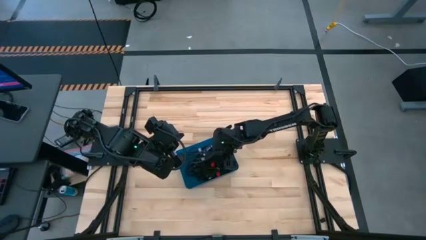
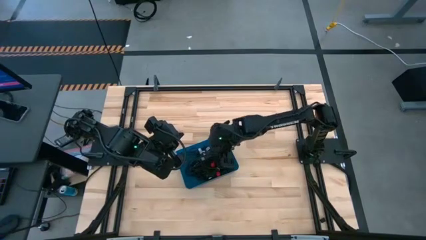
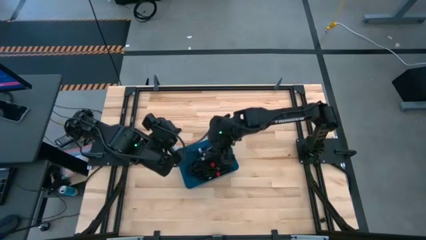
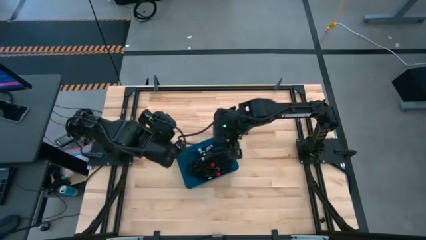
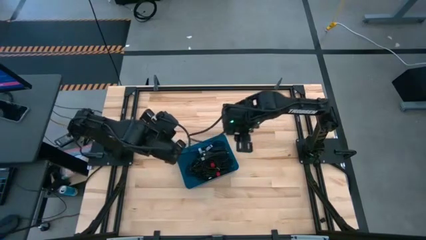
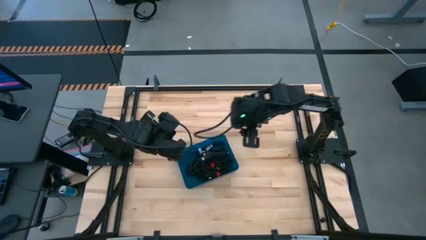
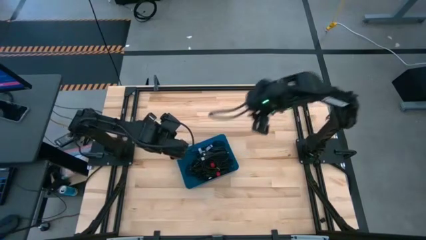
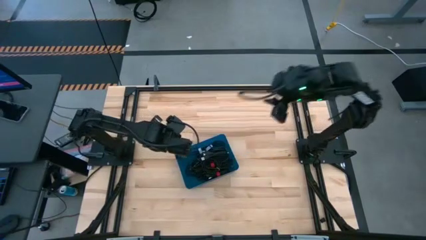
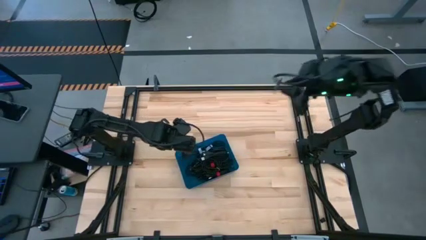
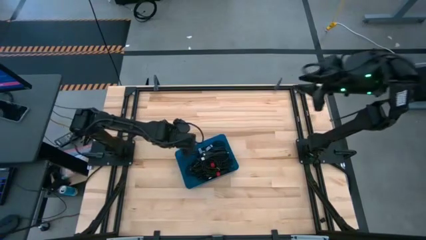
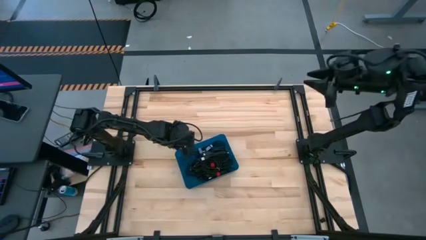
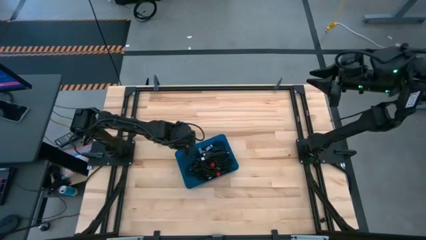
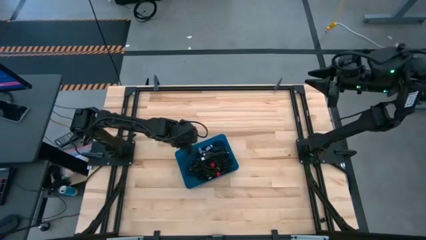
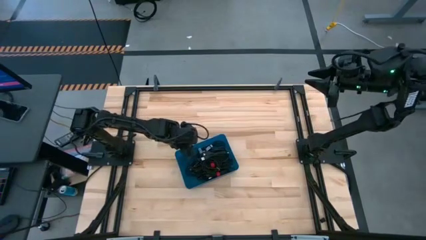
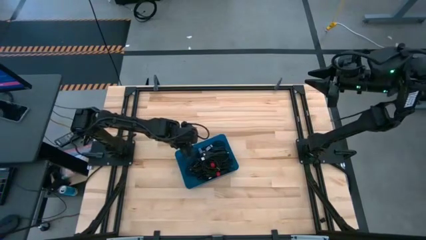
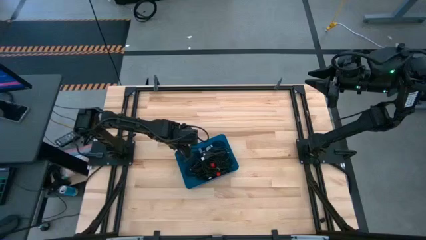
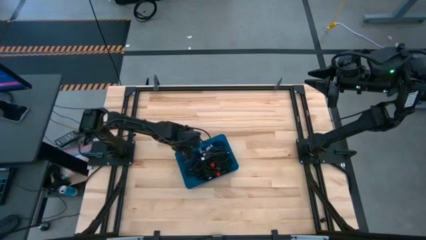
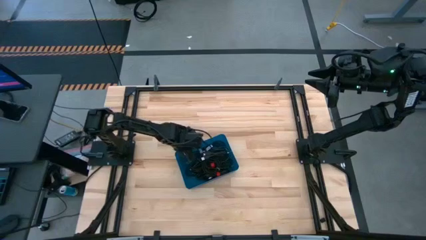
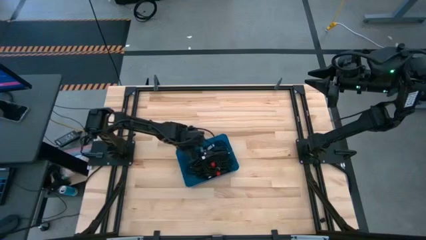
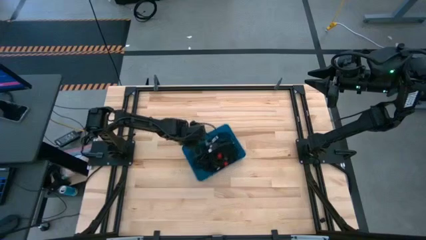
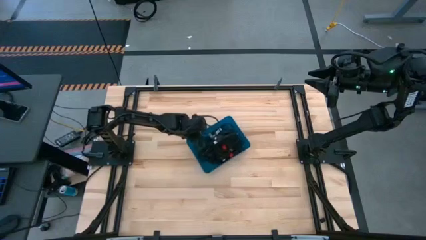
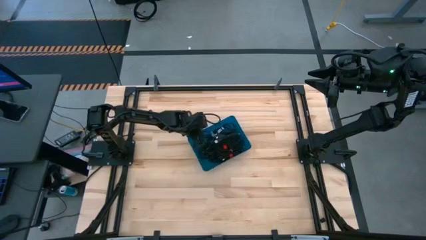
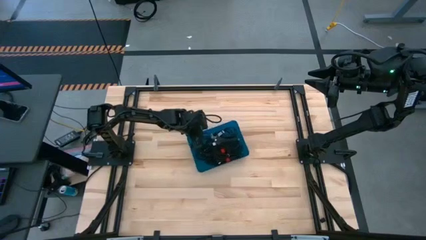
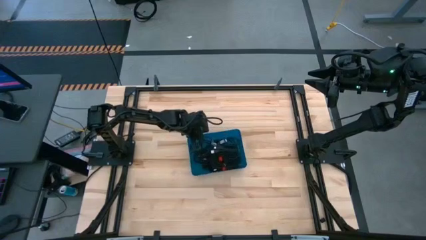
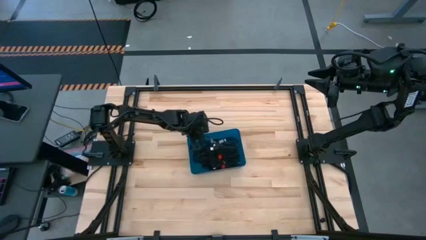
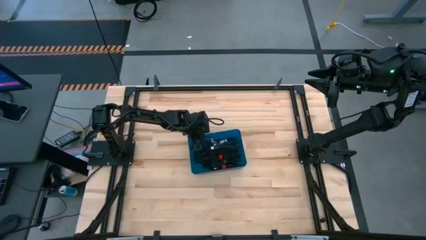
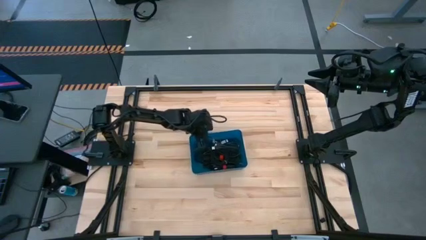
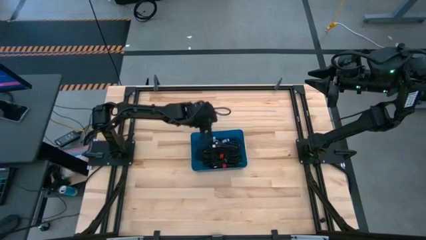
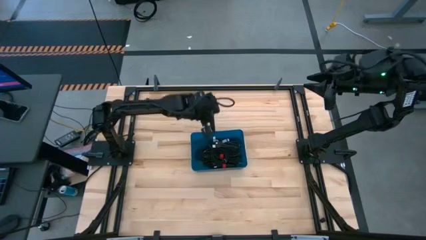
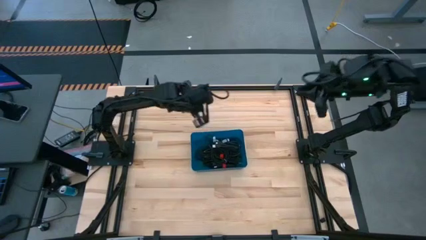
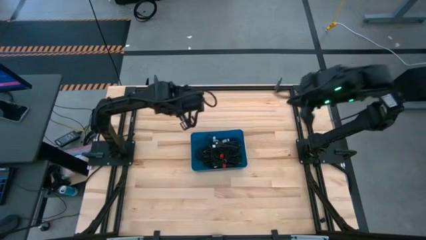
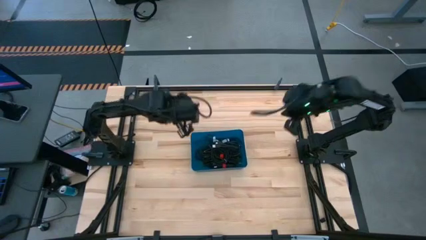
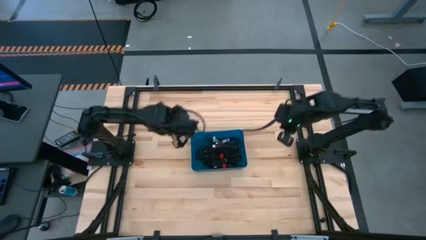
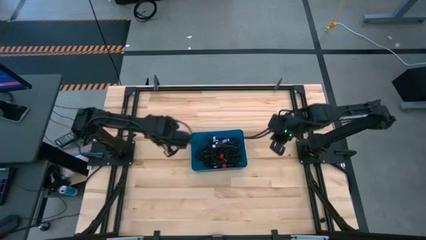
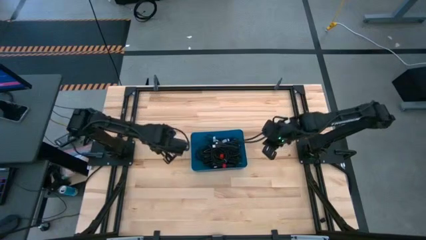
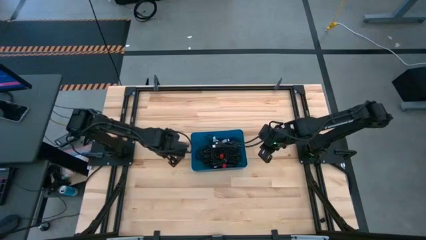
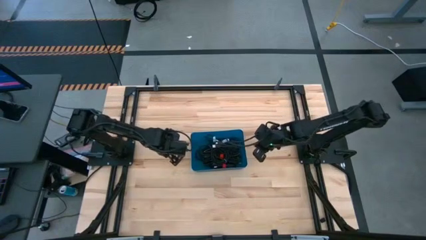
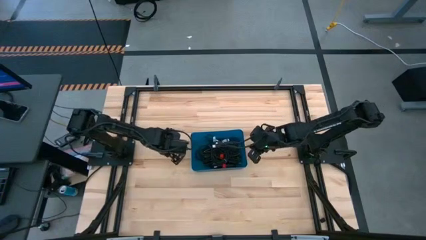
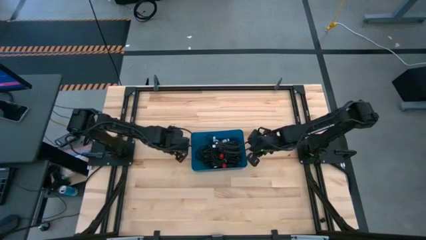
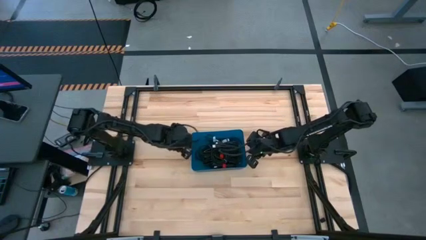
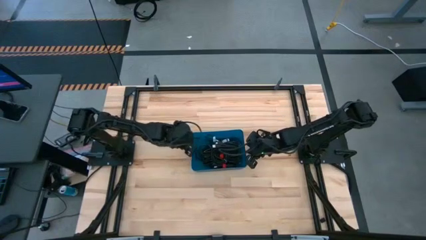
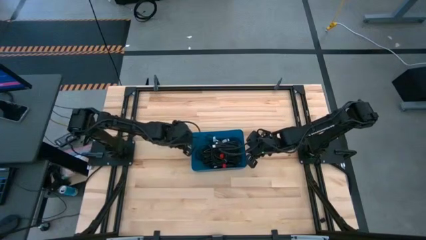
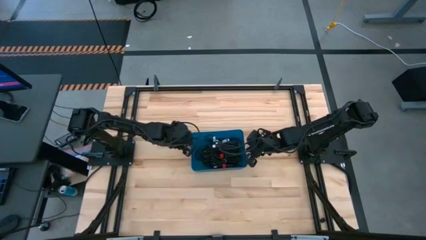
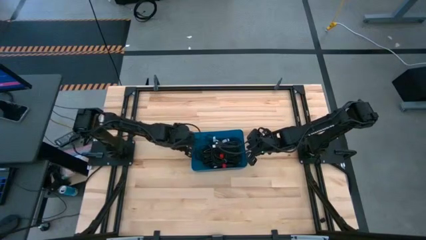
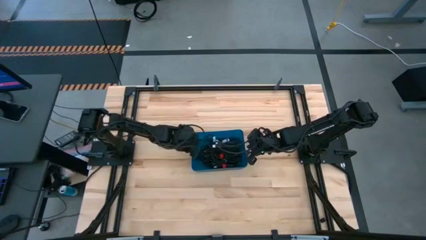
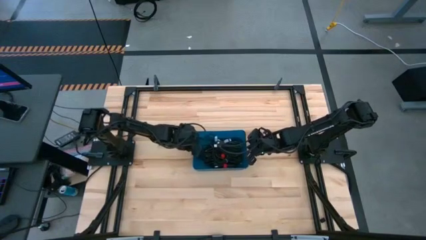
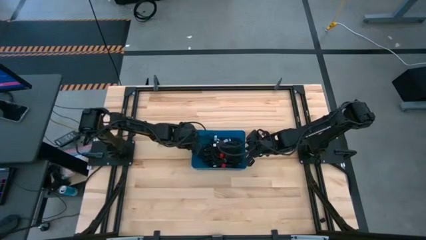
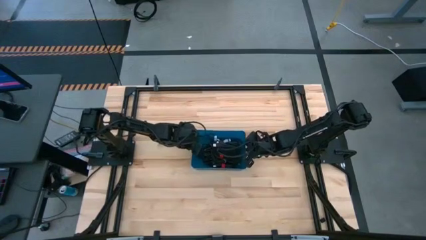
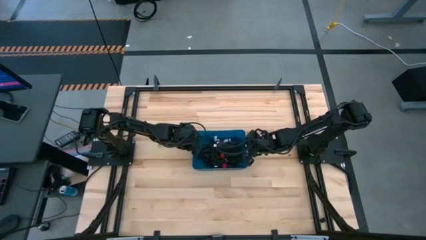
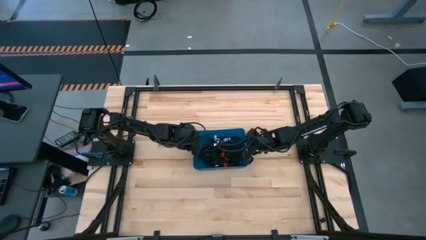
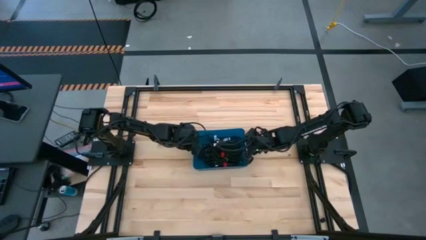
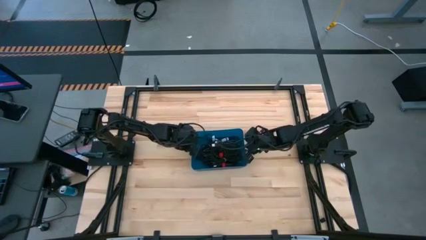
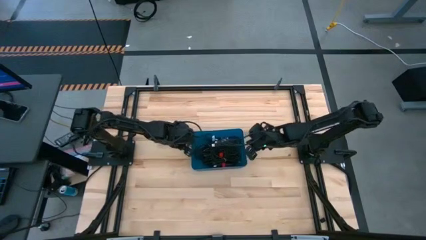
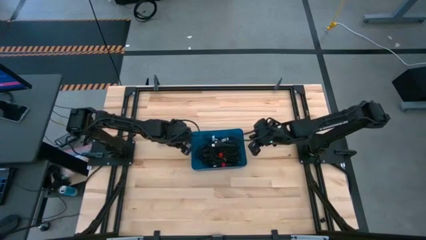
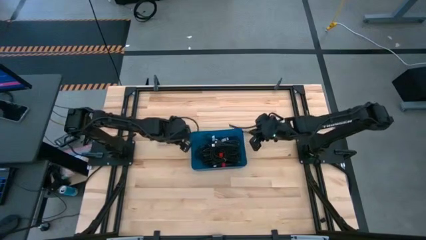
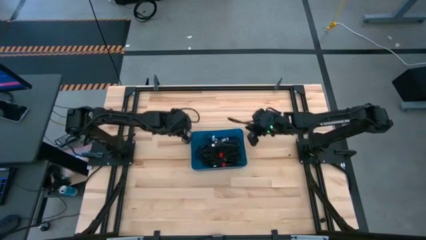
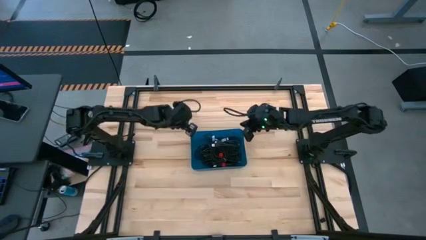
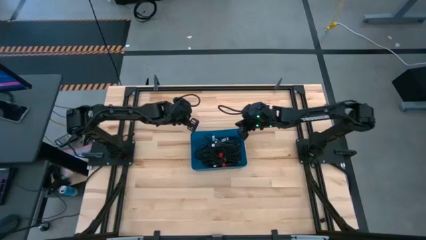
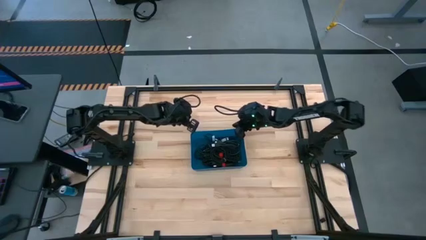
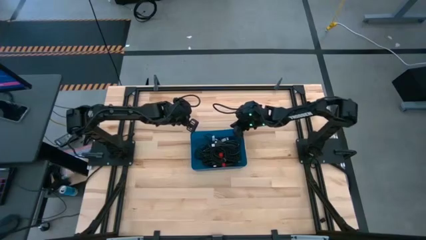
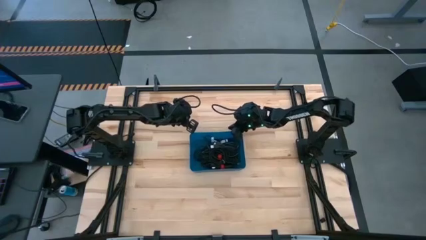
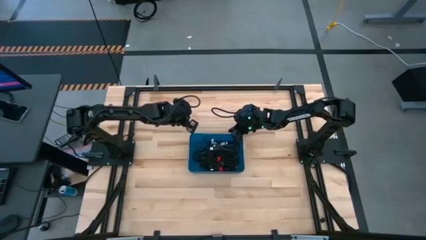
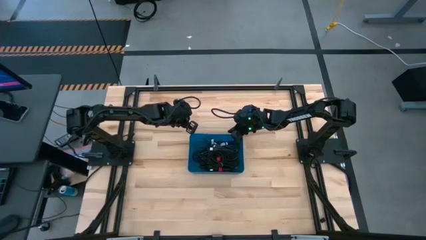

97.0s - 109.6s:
Task: Pick and place USB-C Cables
Adjust the blue bin

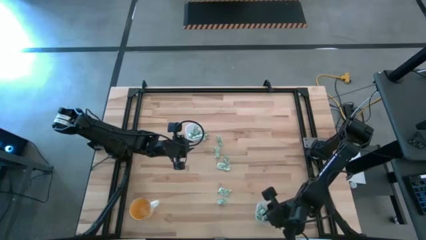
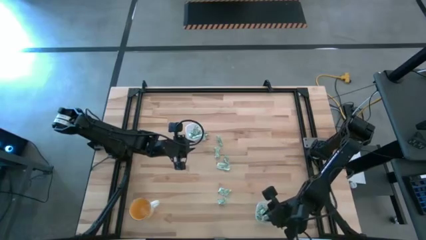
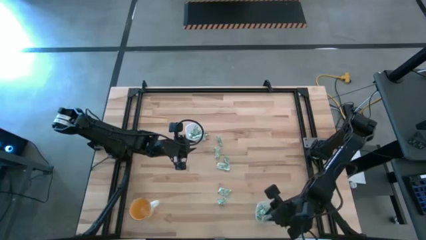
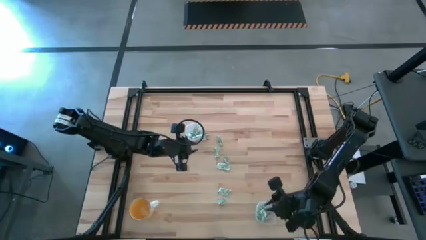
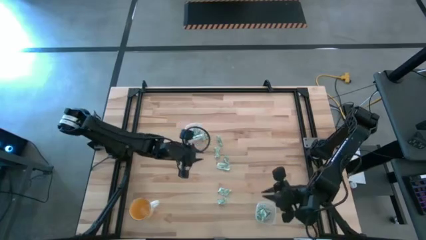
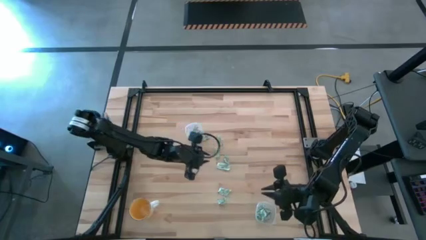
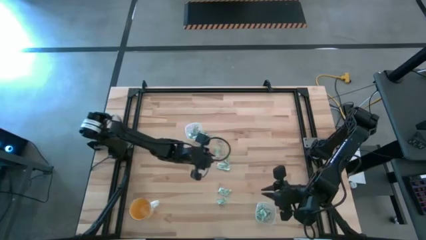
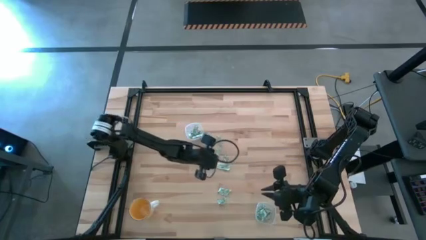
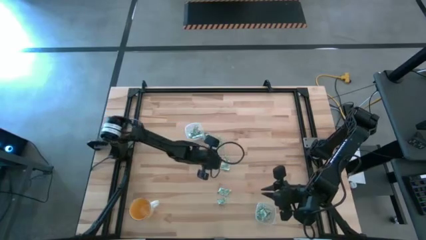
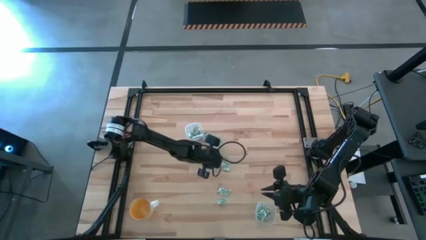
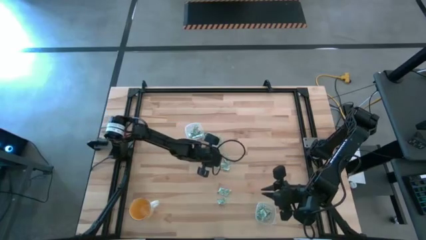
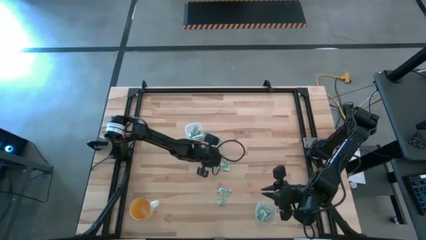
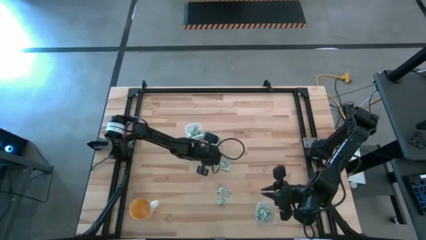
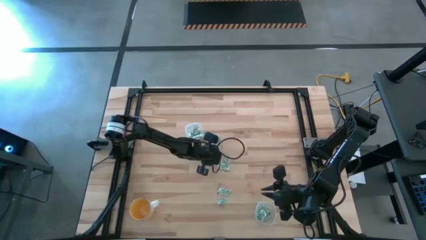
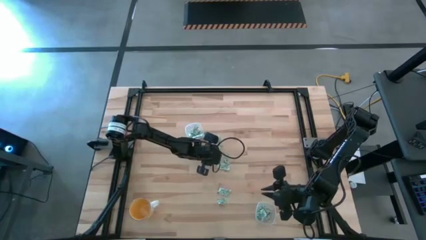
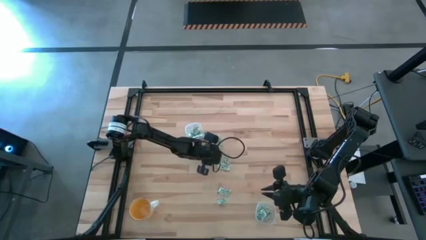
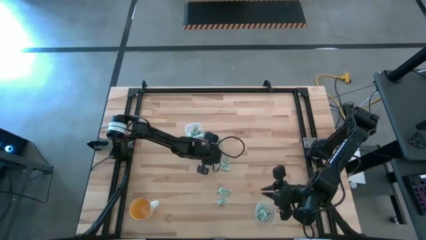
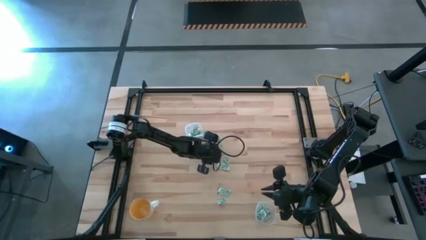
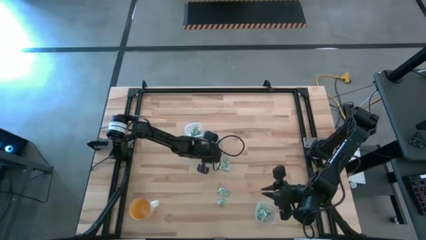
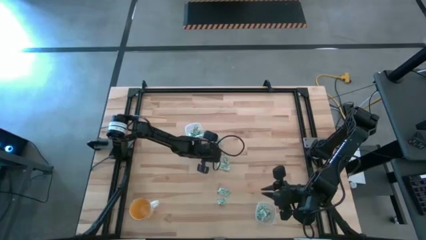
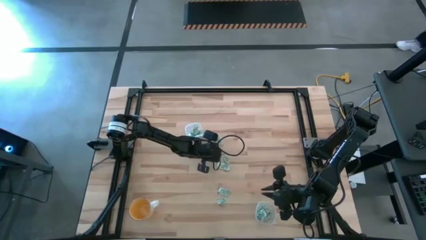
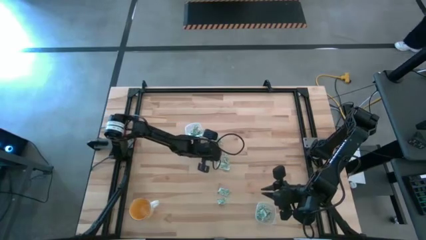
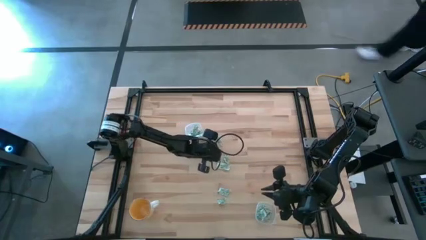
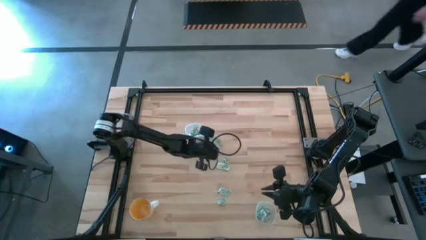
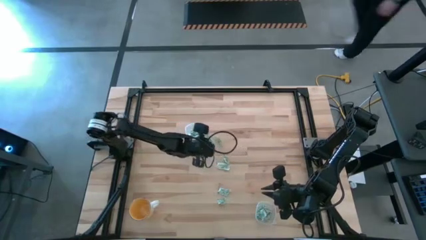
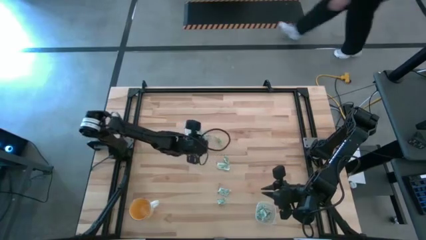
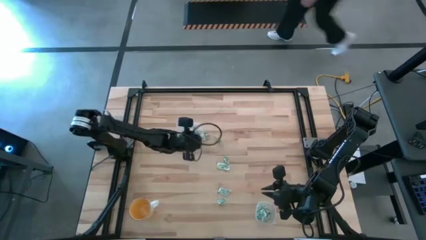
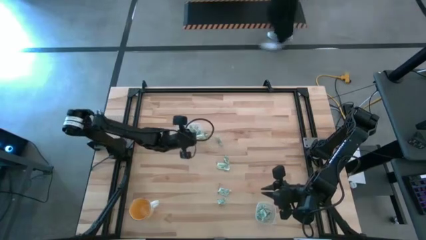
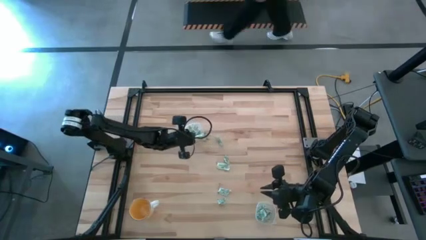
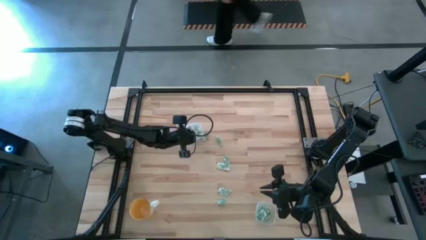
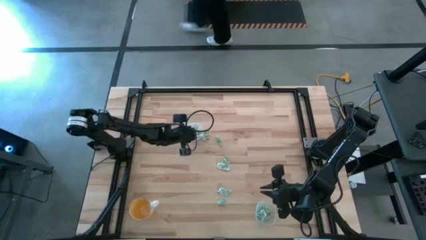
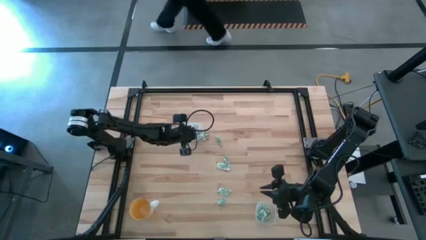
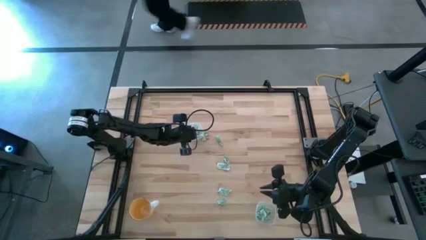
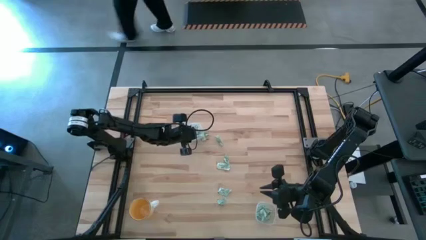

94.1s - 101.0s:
Task: Pick and place Stevia / Truvia into bins
Put the stevia packet into the top transparent container
